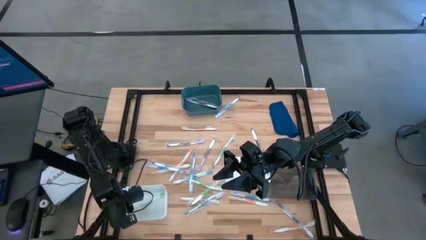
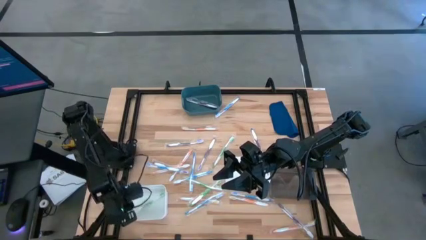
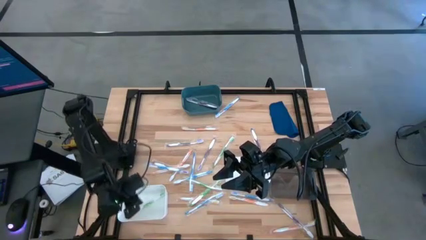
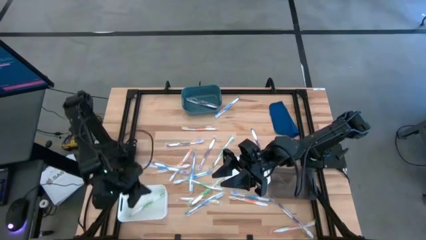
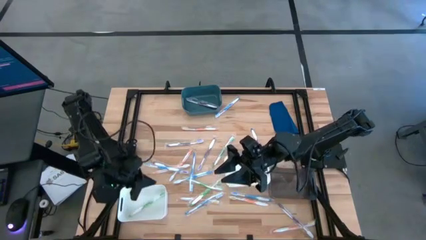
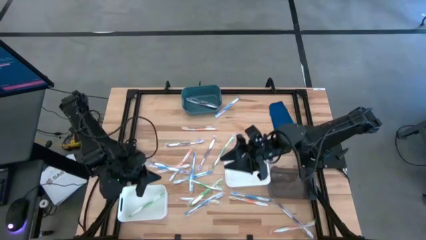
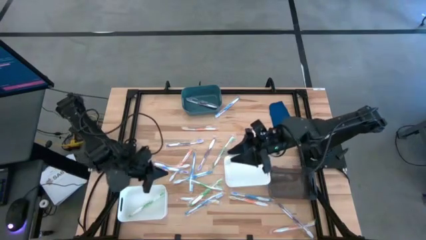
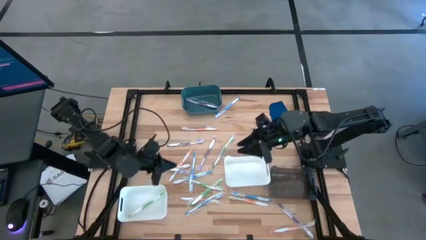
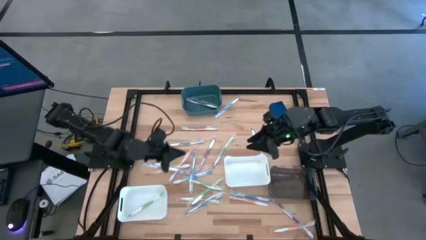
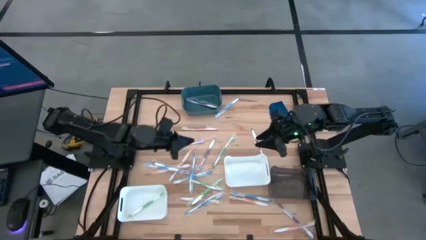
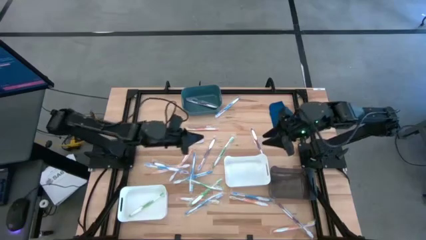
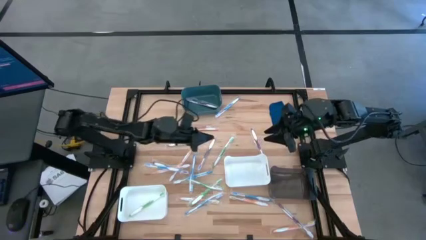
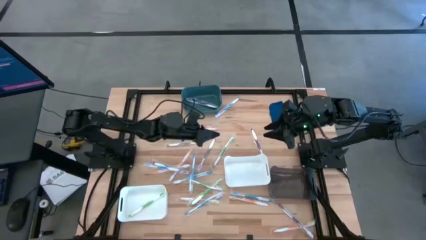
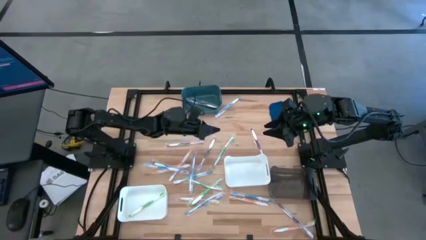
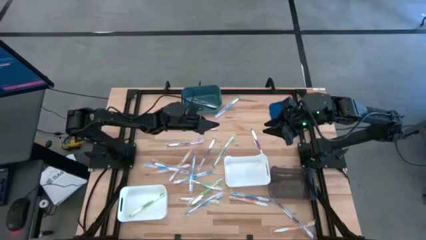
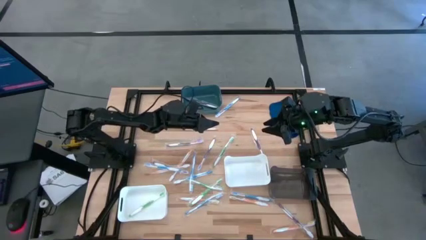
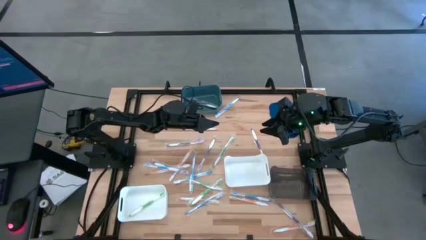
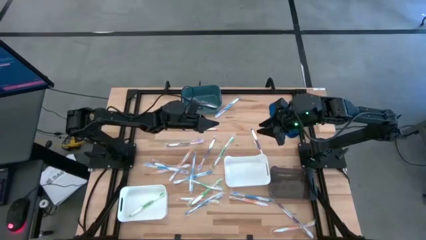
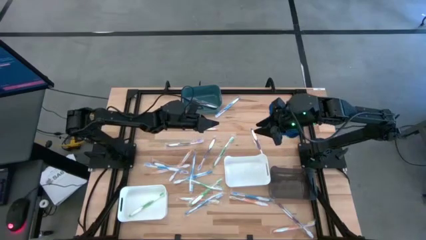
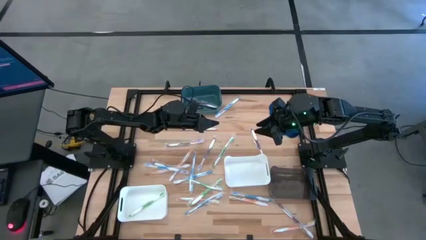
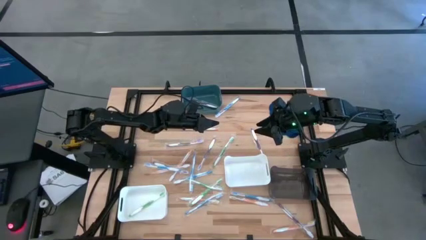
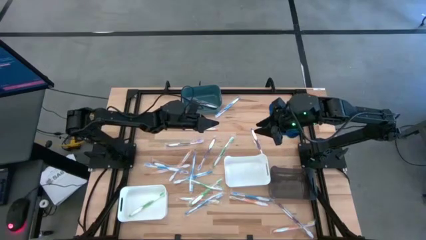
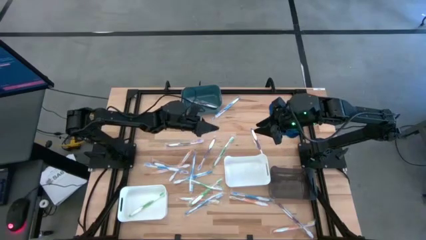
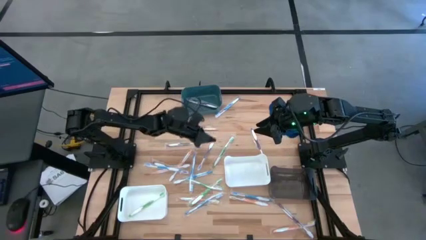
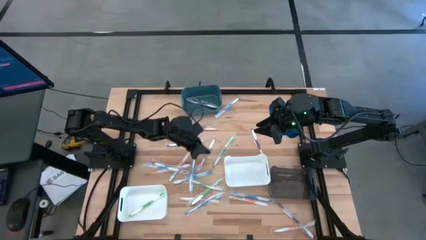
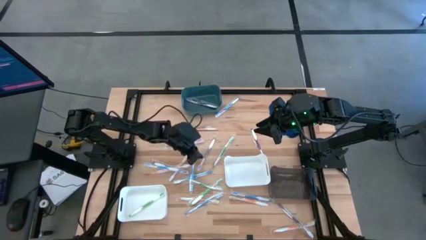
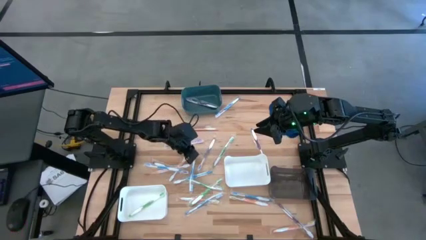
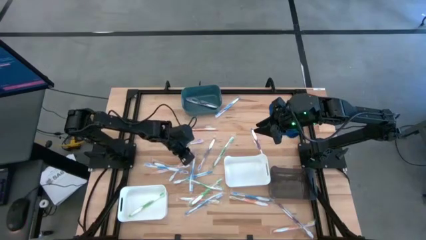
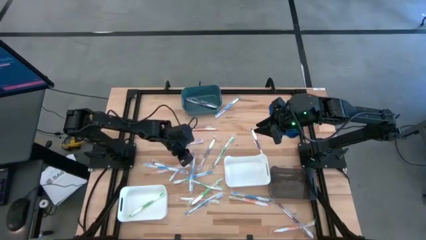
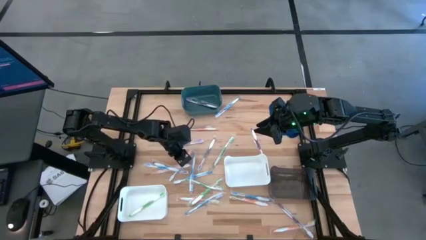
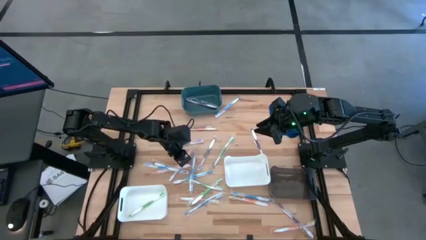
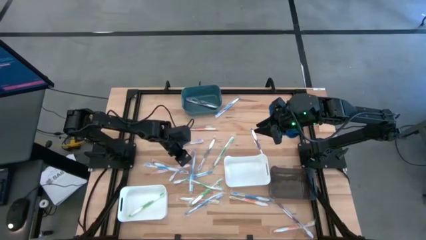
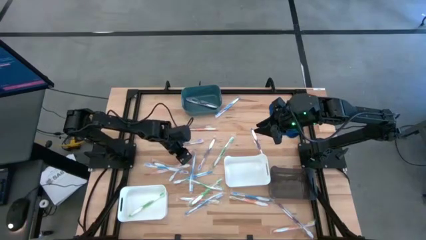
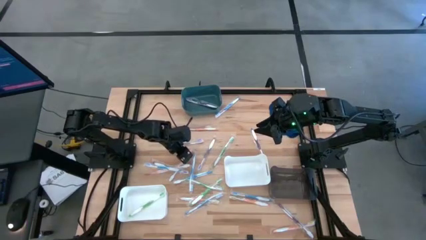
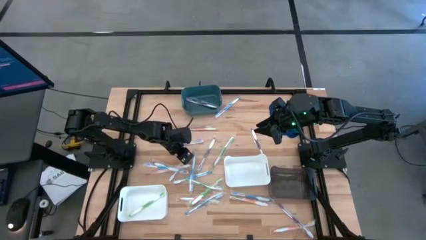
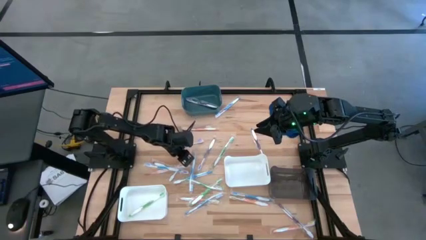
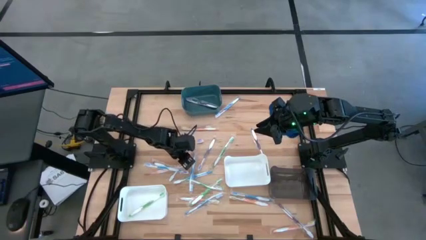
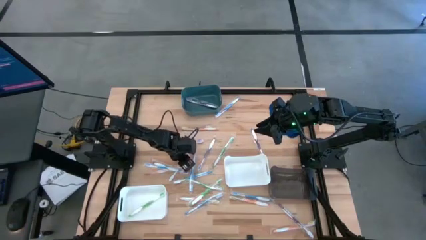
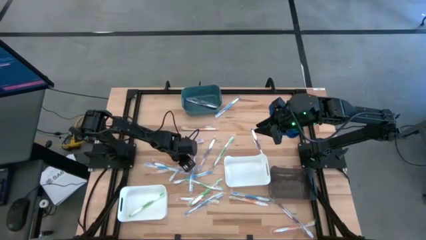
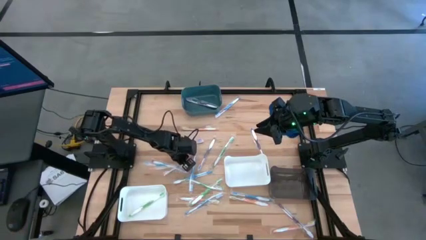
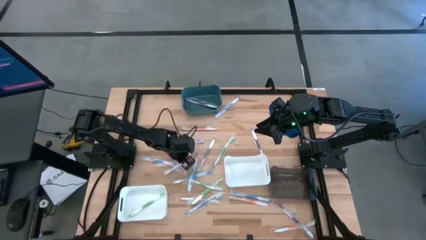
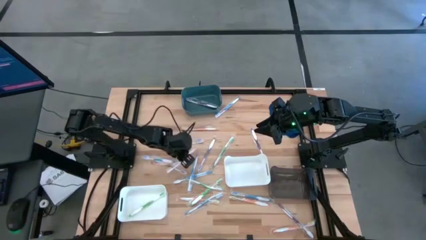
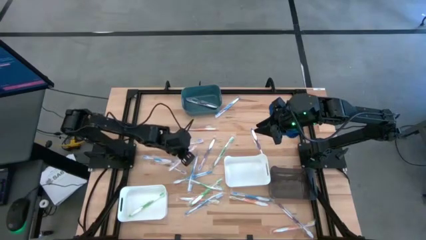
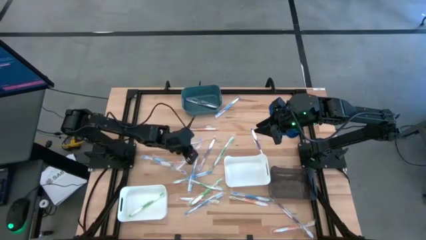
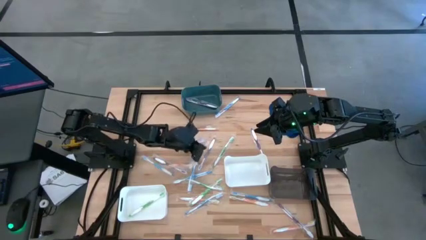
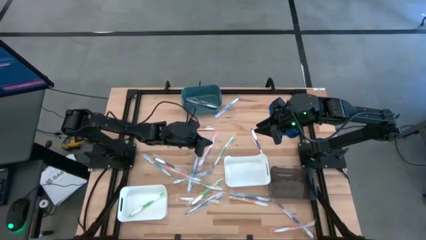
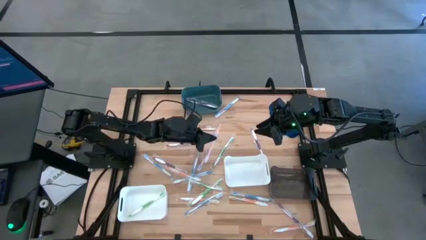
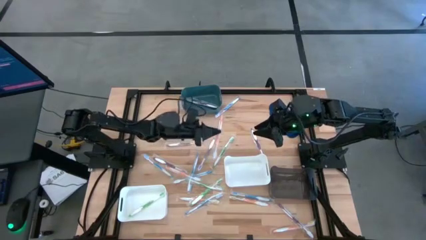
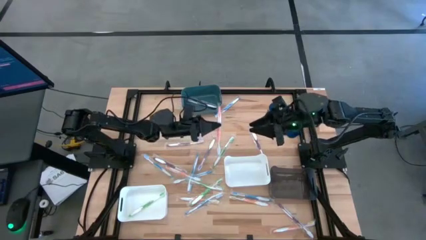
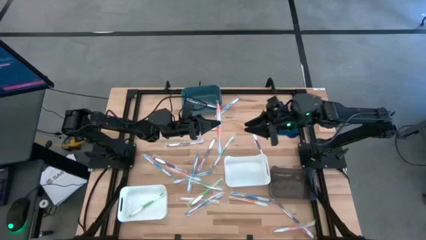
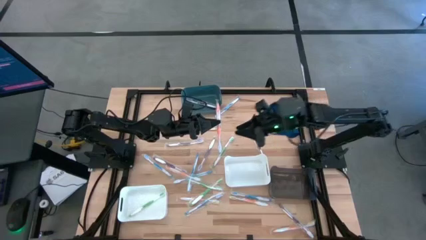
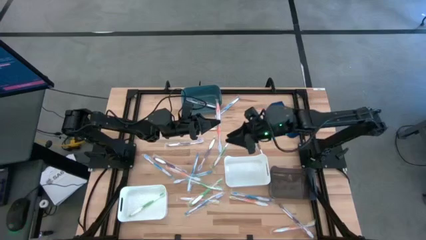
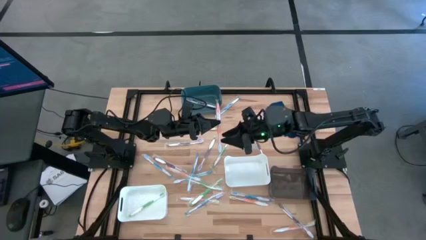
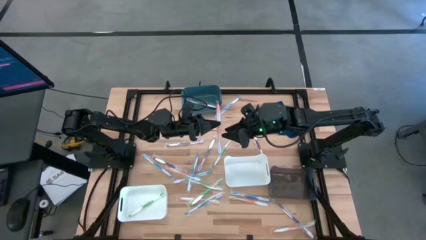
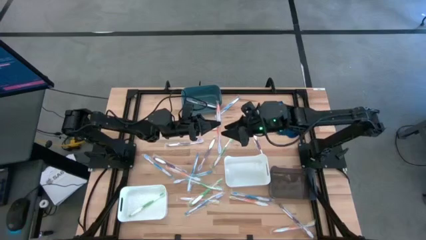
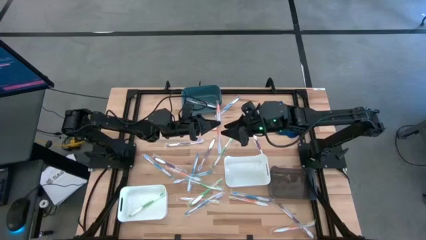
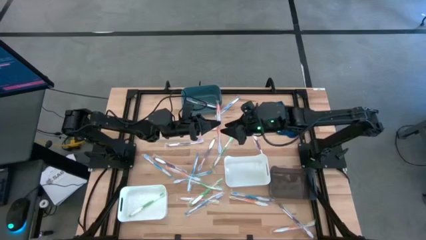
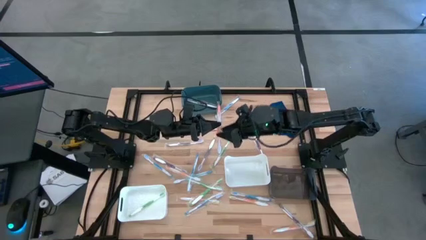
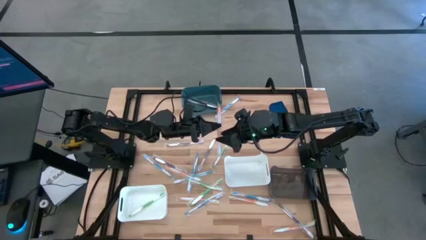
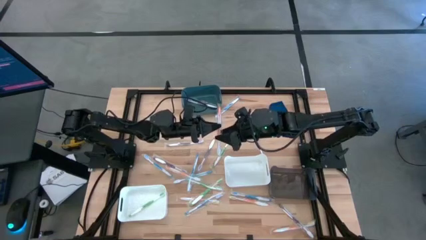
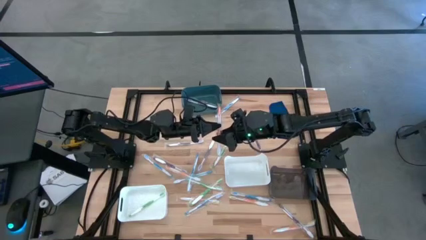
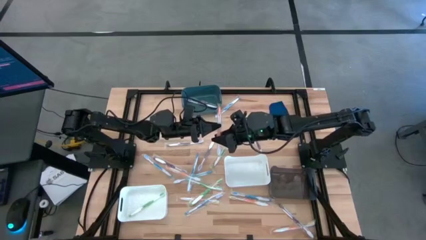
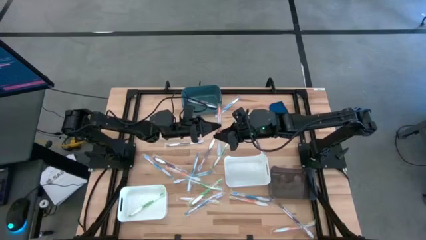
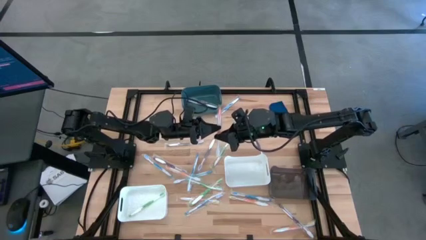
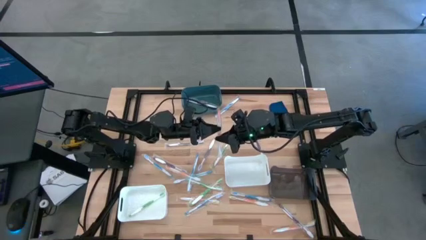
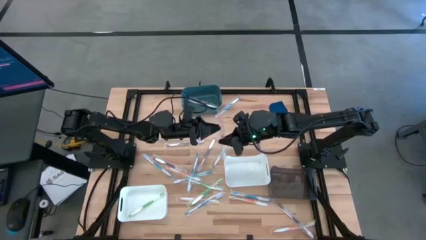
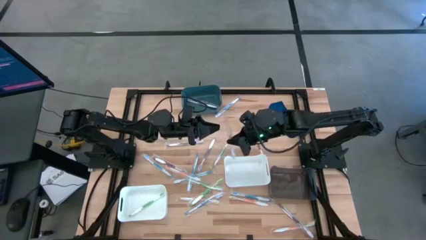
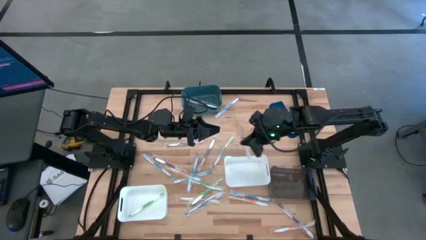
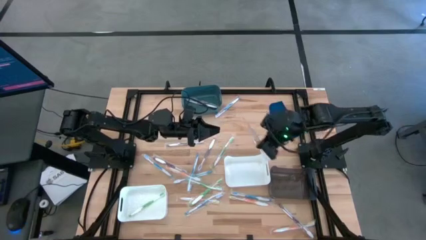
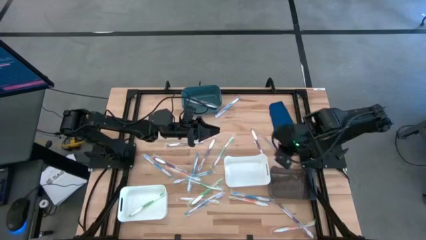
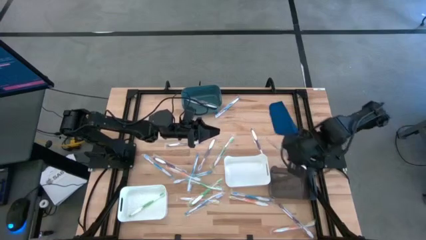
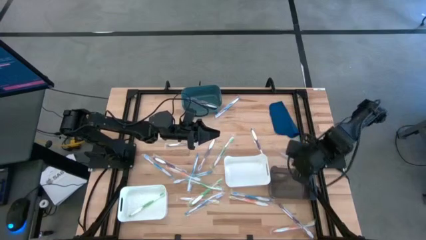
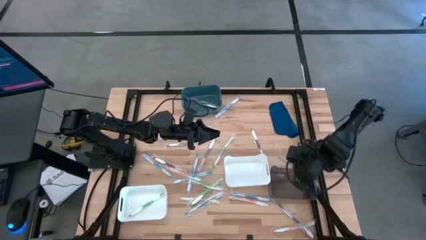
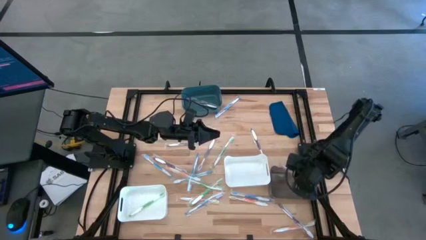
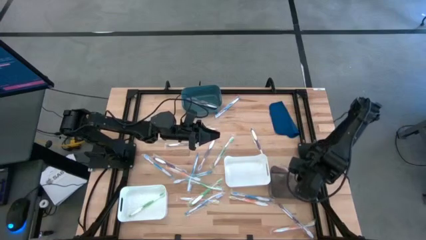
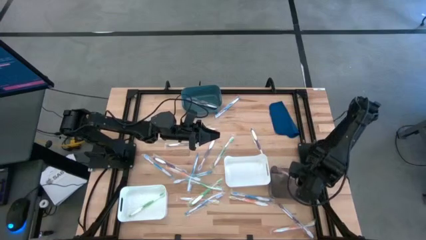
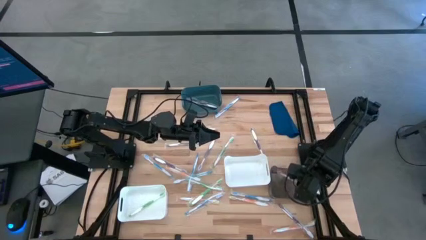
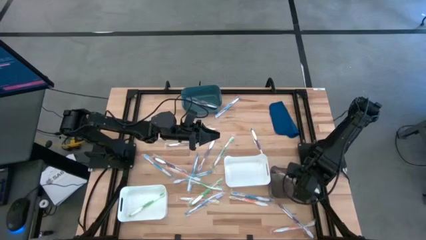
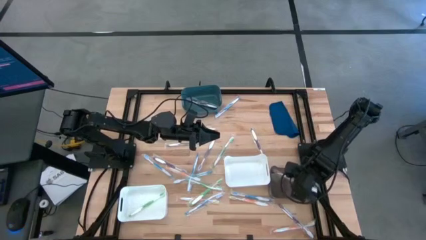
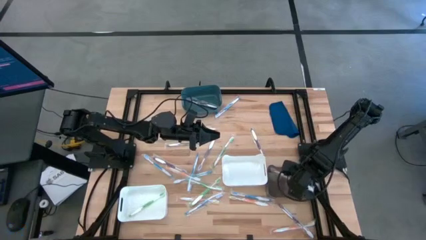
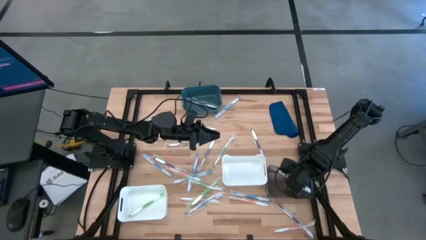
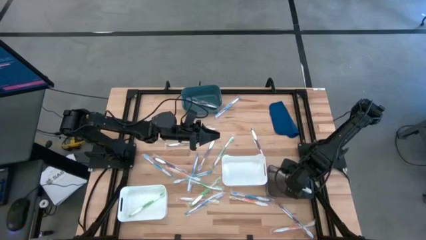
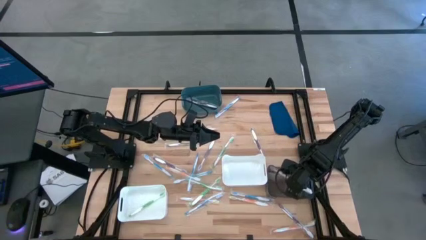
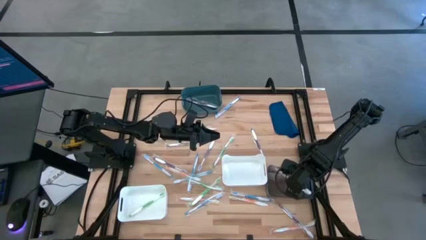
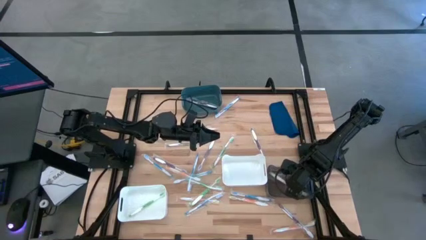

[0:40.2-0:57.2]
Task: Pick & Place Toothbrushes
Put the orange toothbrush into the black bin
